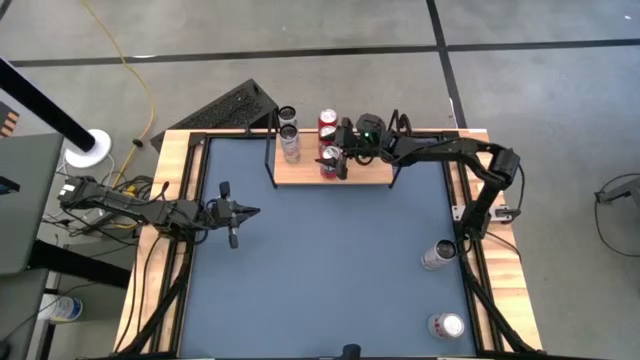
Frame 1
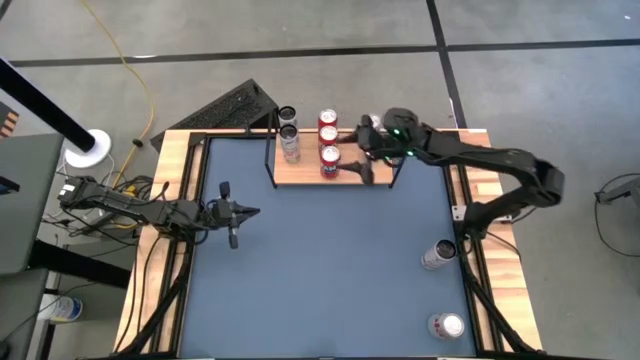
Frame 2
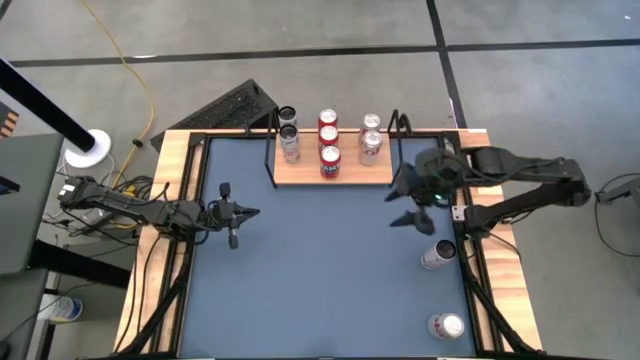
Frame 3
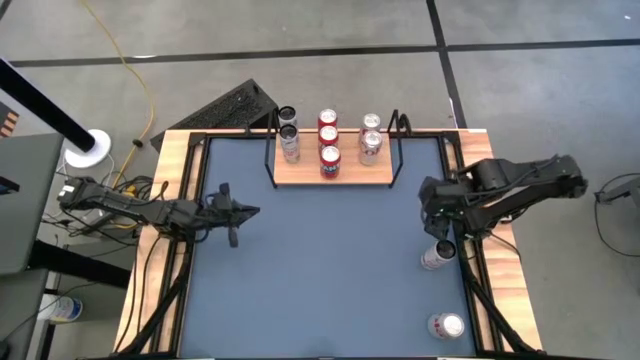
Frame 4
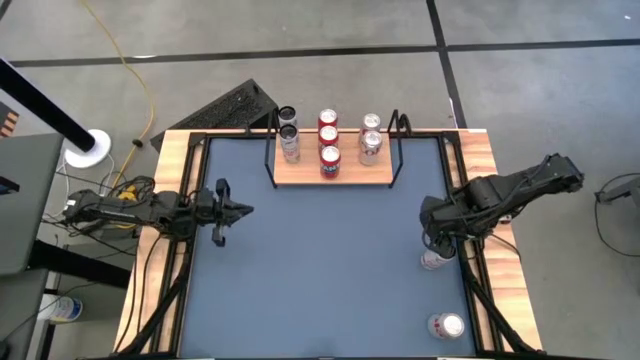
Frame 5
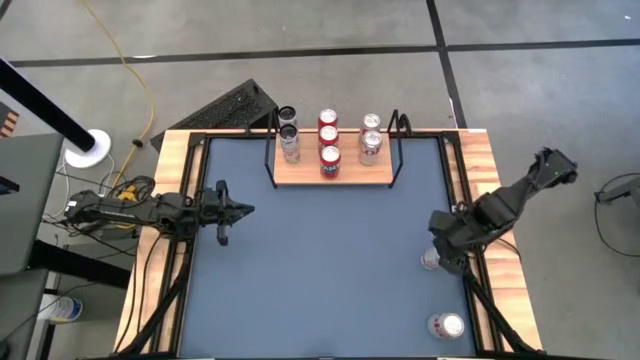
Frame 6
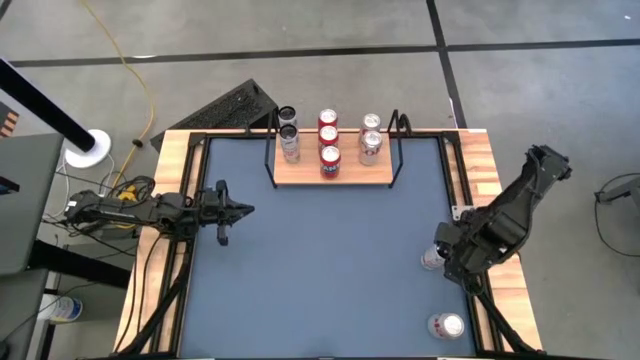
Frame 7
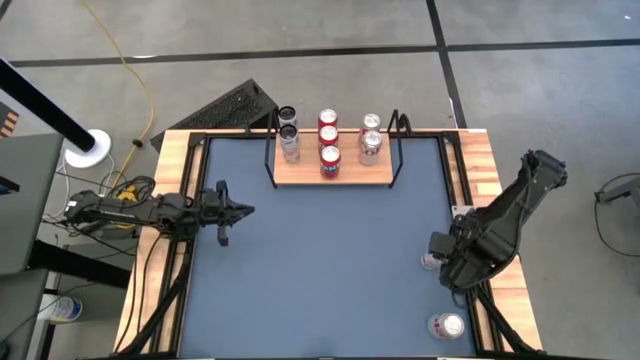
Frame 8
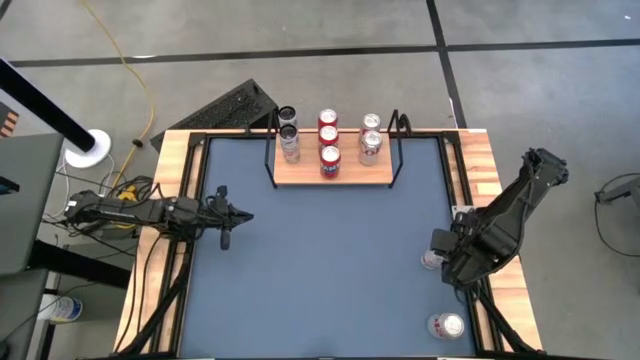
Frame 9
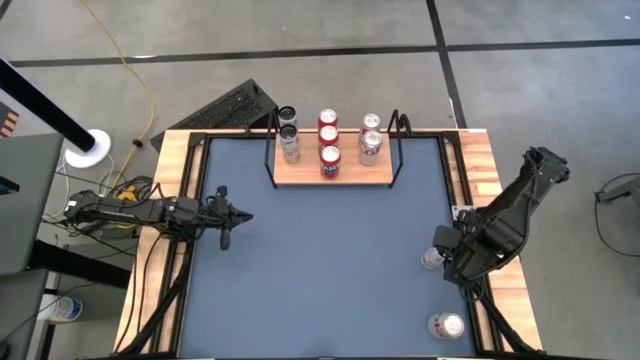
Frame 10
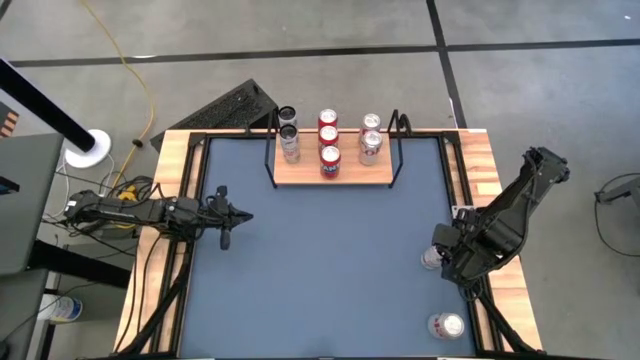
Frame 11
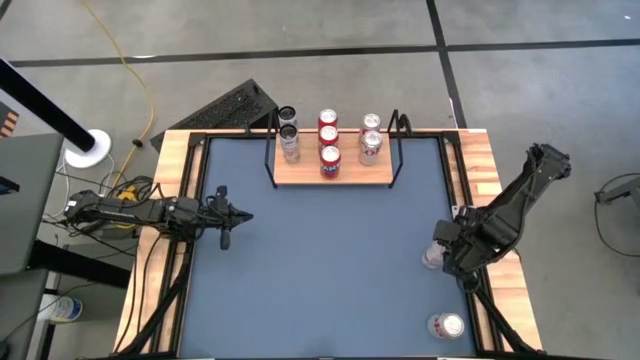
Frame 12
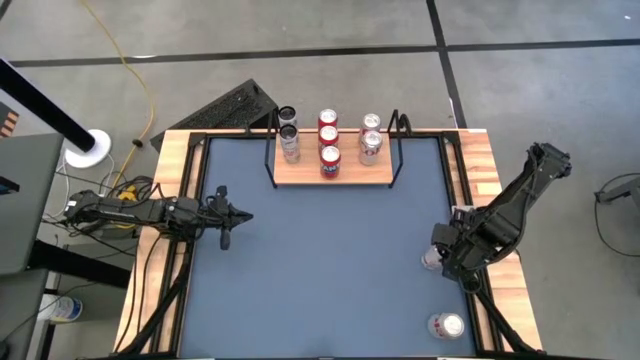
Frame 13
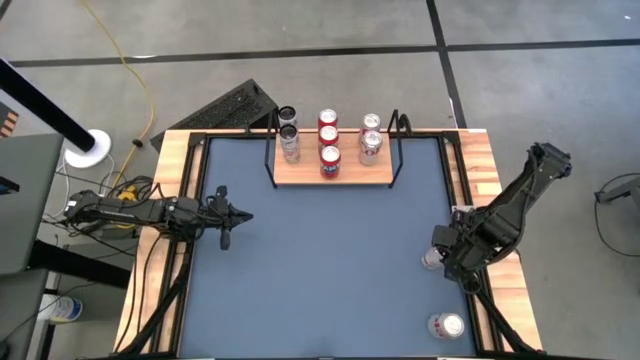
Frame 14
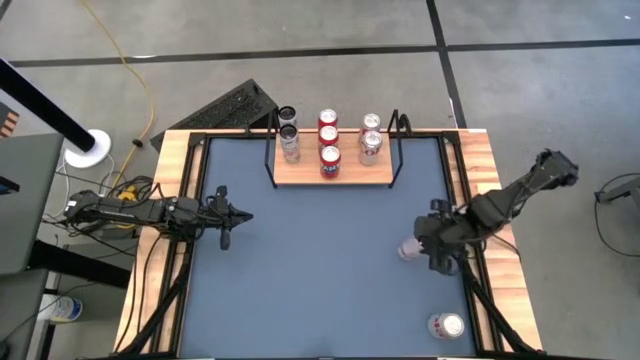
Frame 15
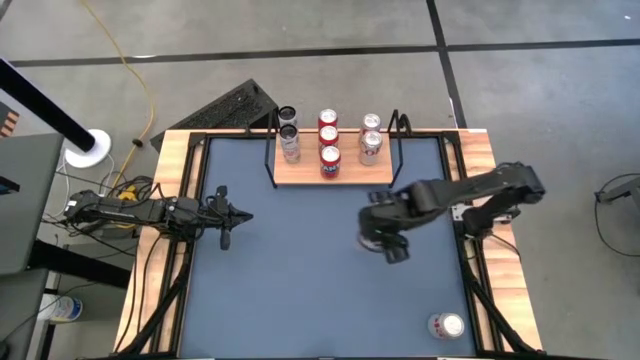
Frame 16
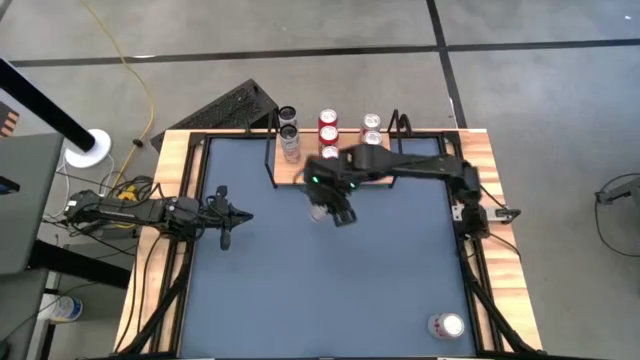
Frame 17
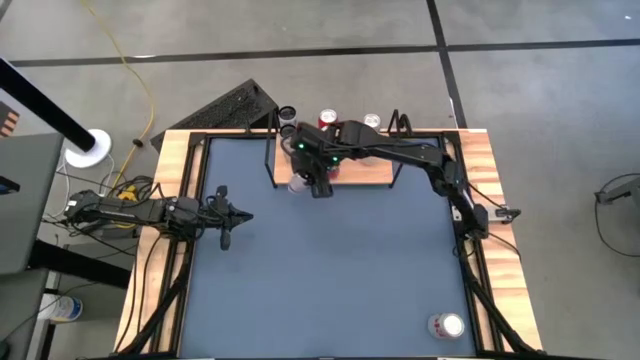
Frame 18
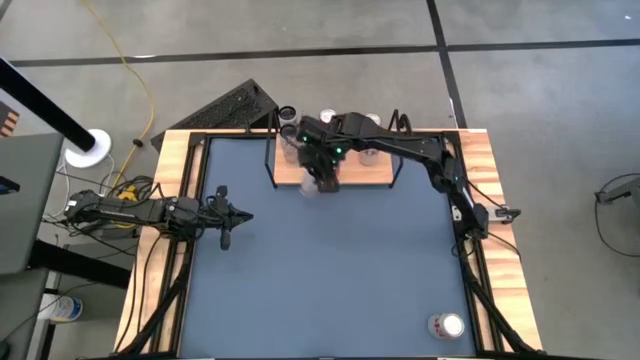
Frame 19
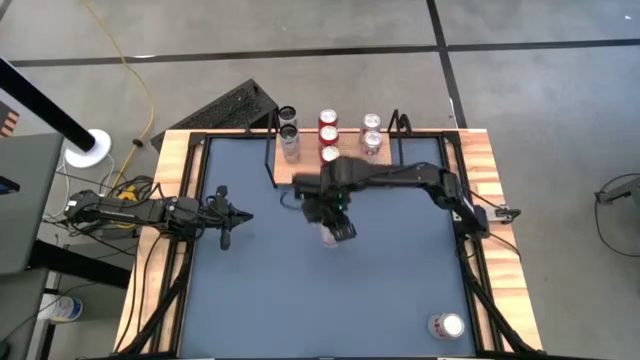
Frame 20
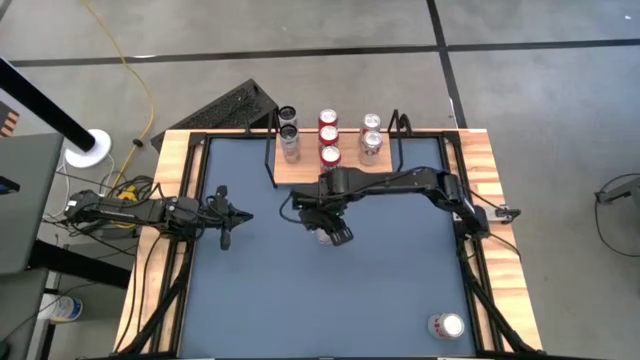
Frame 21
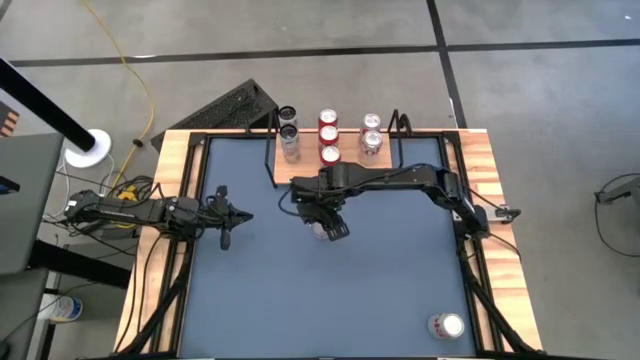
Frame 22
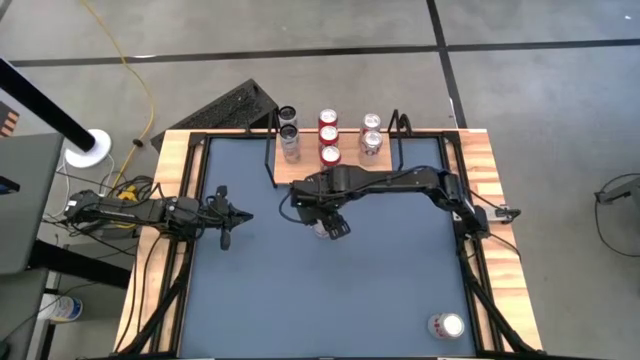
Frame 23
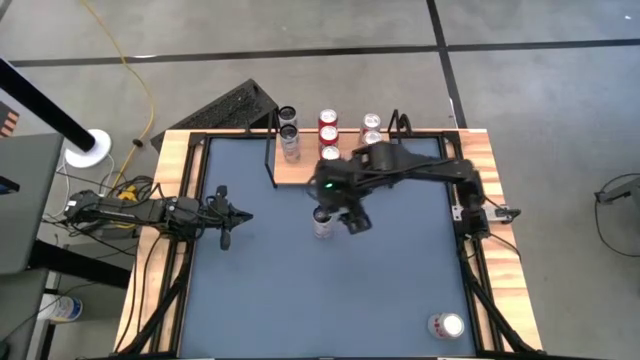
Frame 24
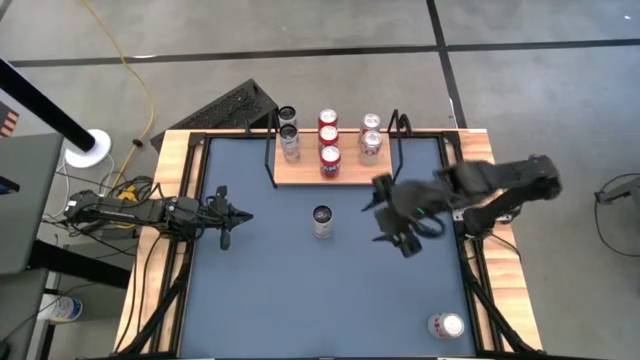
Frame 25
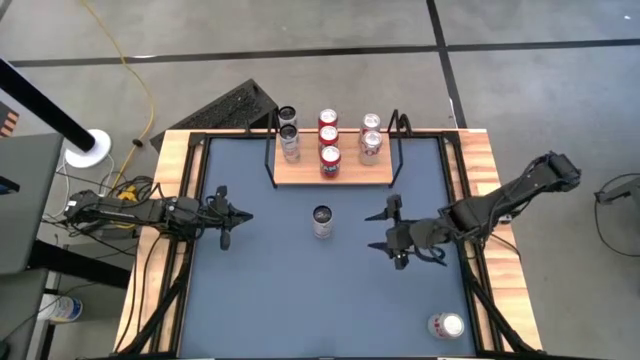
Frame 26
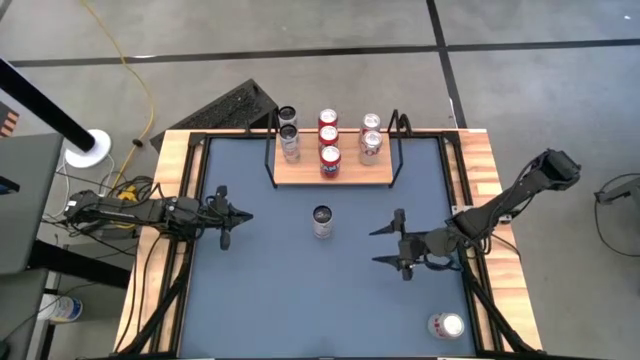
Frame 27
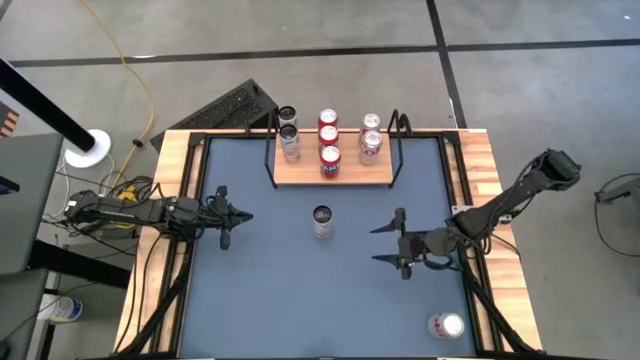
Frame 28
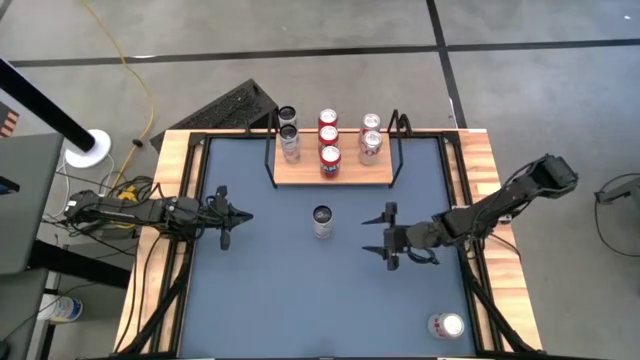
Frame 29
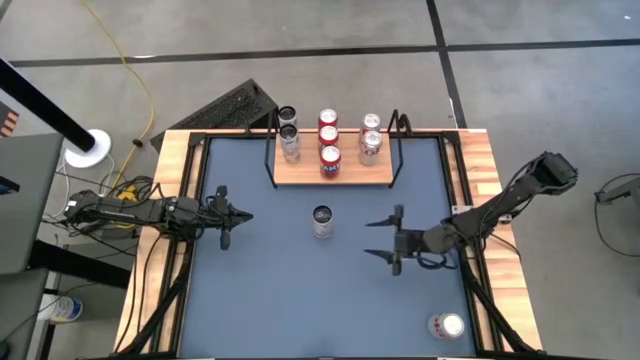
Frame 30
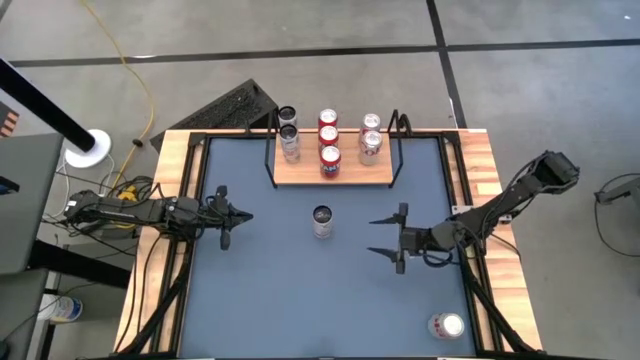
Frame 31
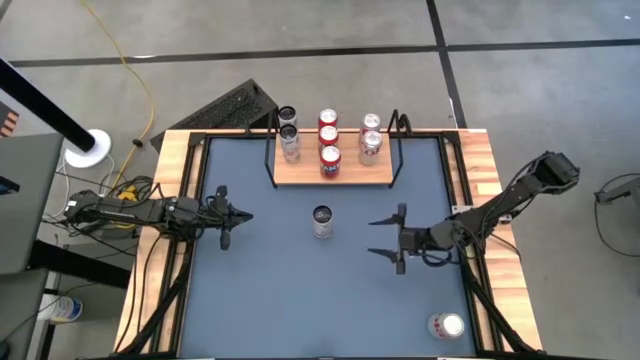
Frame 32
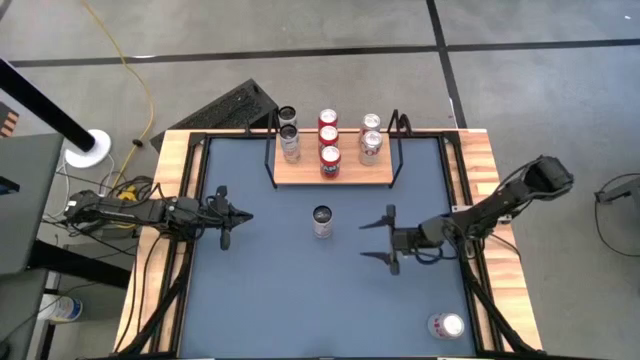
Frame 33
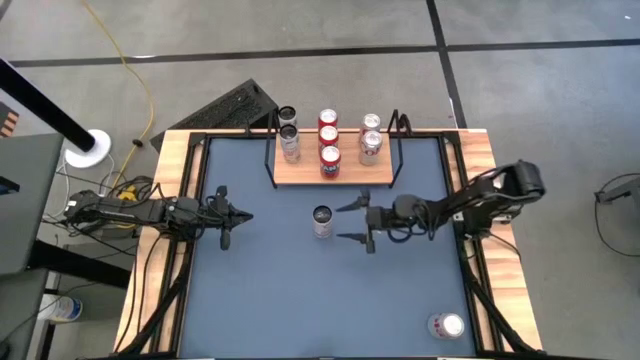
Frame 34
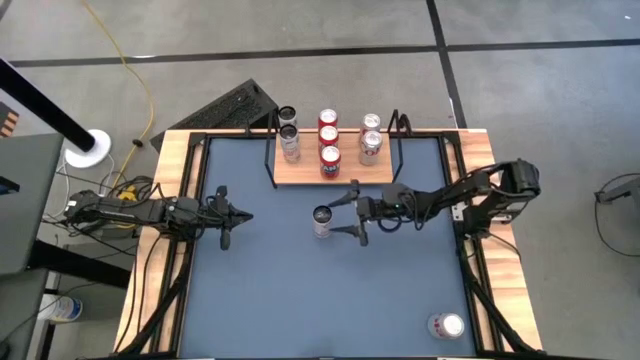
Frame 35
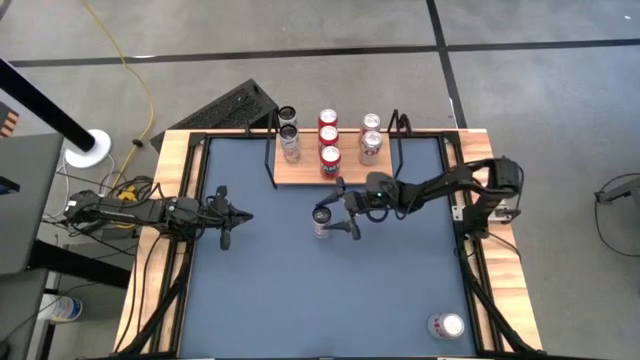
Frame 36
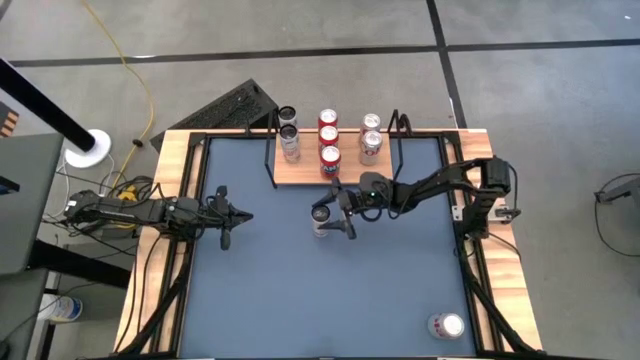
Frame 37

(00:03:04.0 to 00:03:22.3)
Task: Place canned beverage on shelf
Put the white-pink soda can on the shelf aligned with the other white-pink soda cans

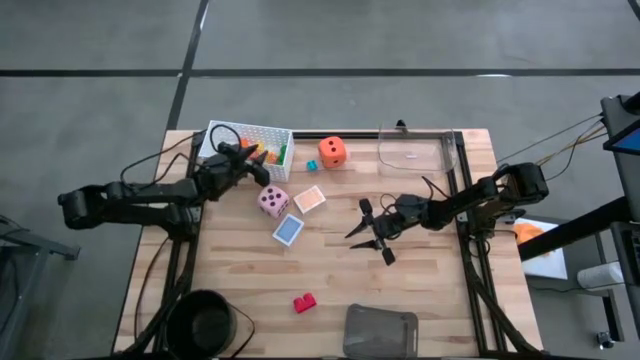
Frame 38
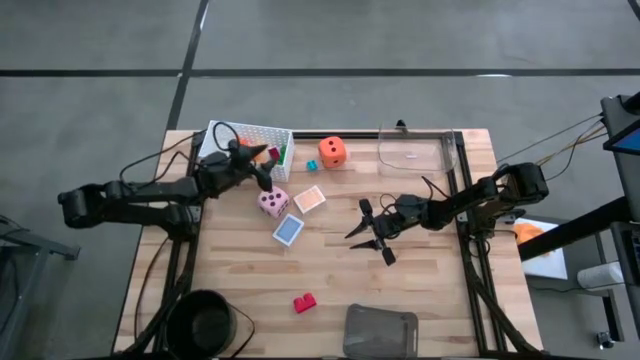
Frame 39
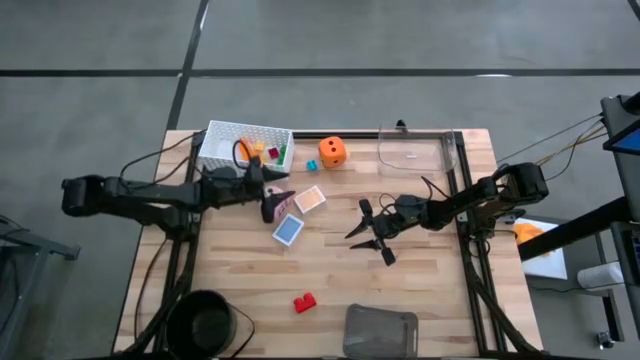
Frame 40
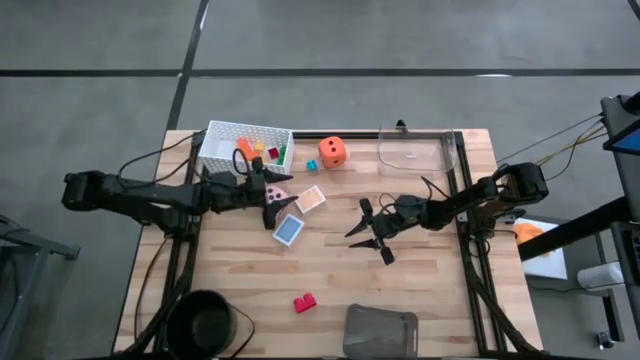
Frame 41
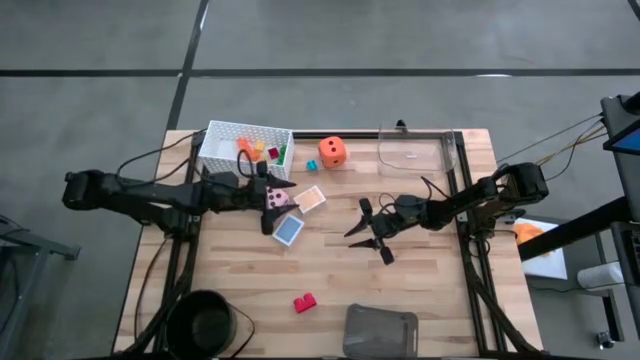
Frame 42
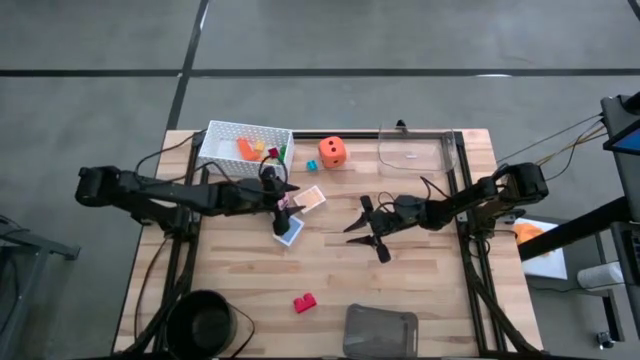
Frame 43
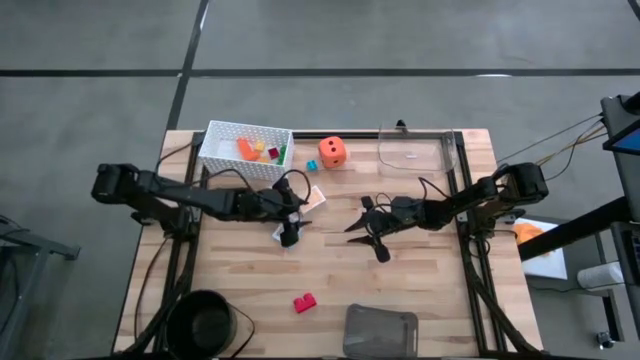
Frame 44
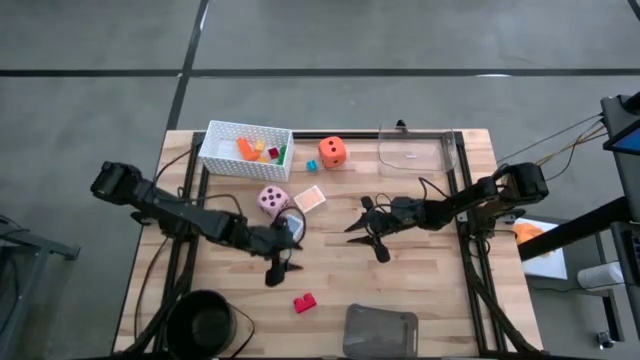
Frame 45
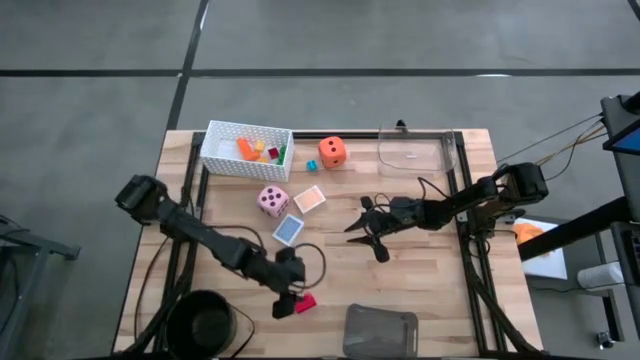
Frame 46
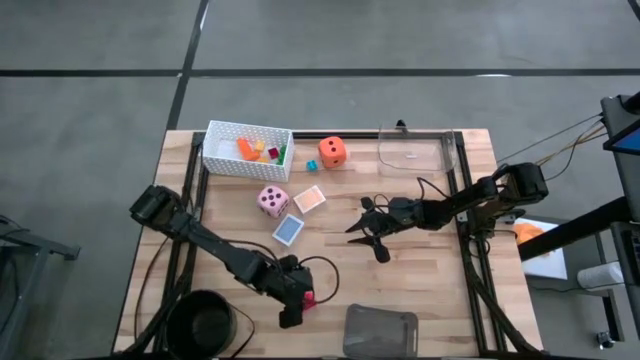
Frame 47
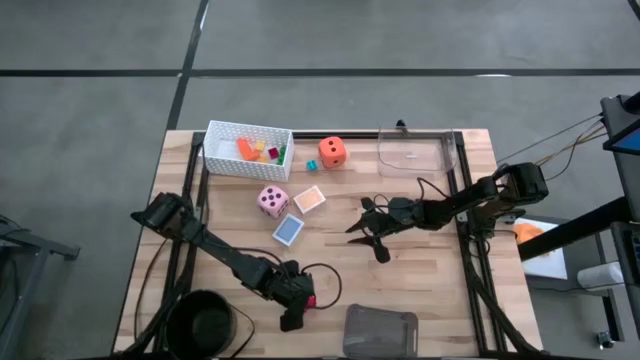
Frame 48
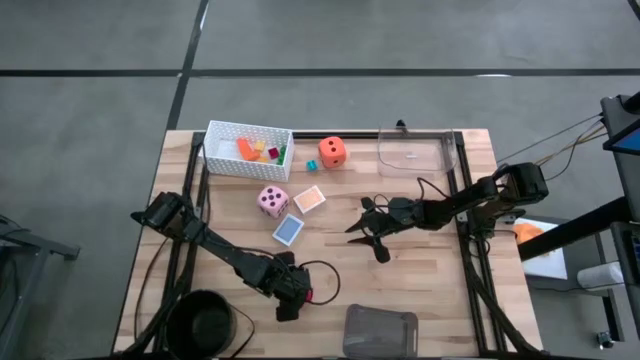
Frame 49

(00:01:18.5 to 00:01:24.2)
Task: Pick & Place Toys
Put the large red game piece into the white bin
